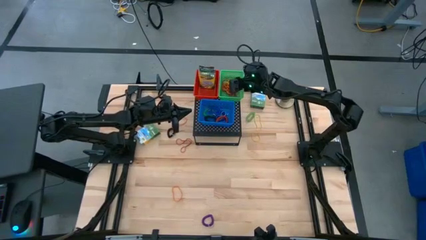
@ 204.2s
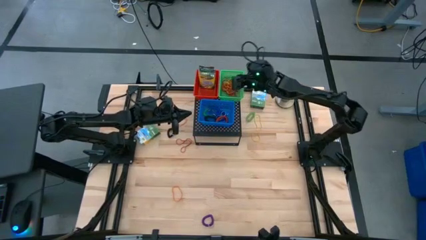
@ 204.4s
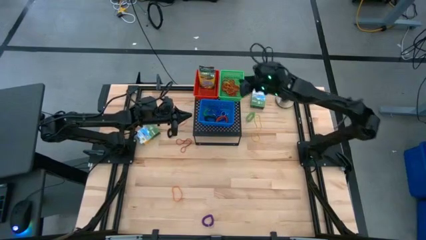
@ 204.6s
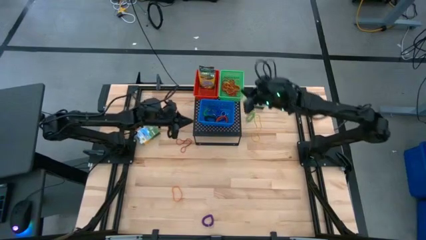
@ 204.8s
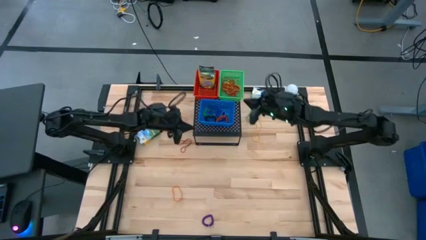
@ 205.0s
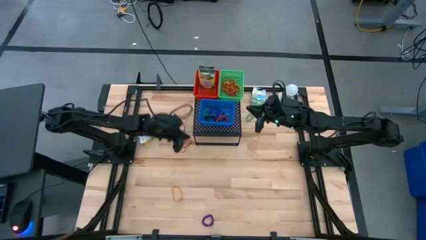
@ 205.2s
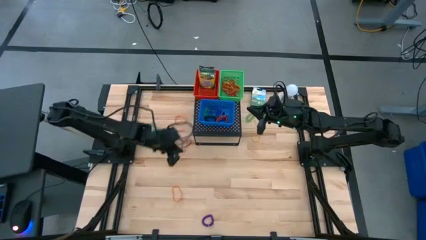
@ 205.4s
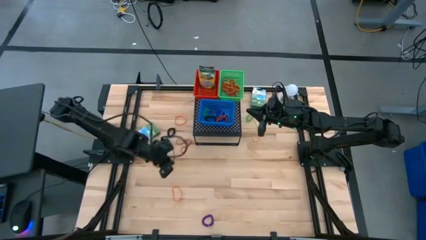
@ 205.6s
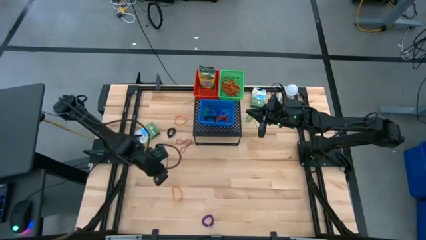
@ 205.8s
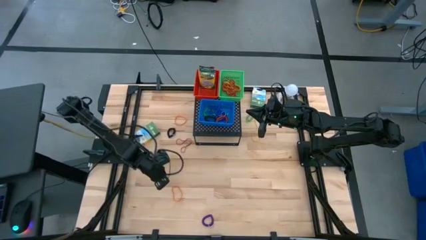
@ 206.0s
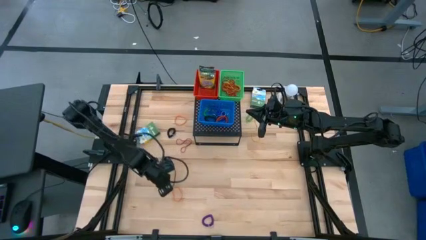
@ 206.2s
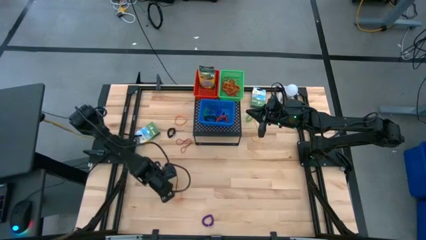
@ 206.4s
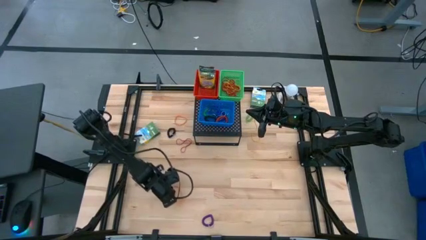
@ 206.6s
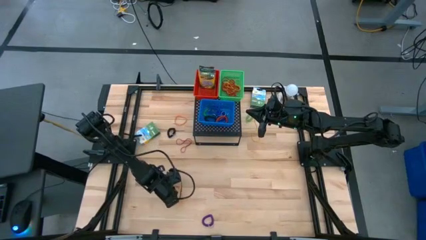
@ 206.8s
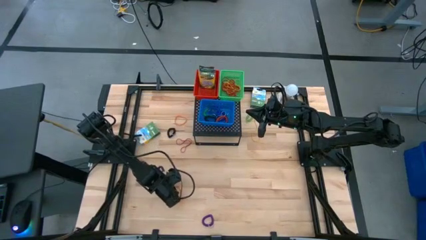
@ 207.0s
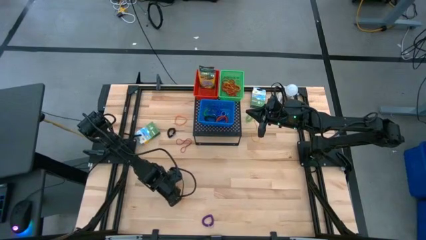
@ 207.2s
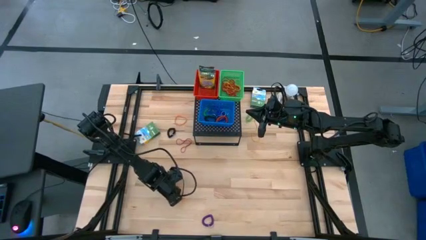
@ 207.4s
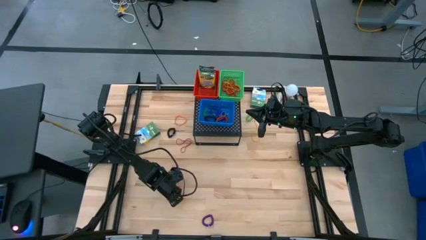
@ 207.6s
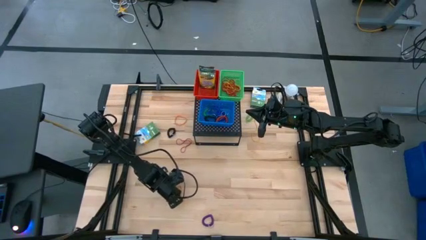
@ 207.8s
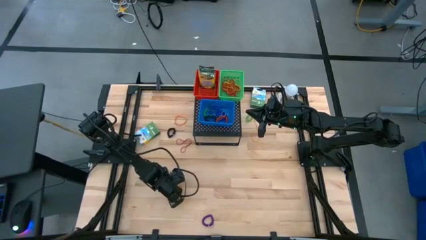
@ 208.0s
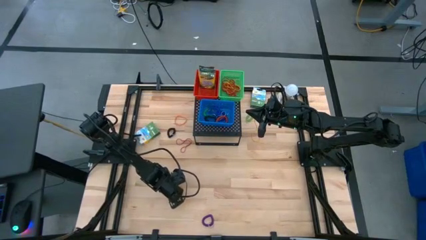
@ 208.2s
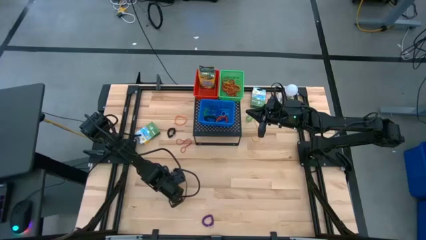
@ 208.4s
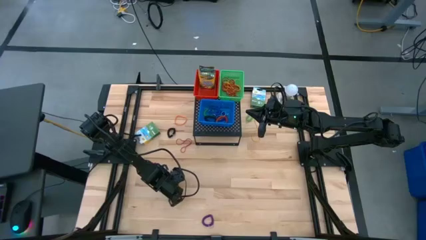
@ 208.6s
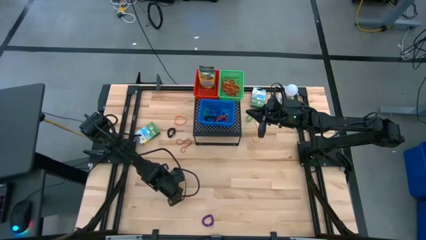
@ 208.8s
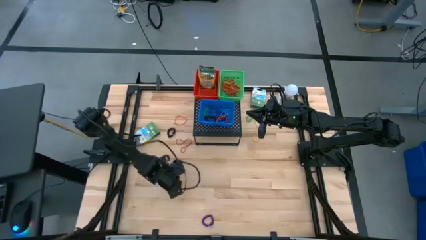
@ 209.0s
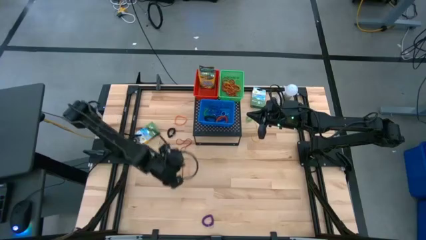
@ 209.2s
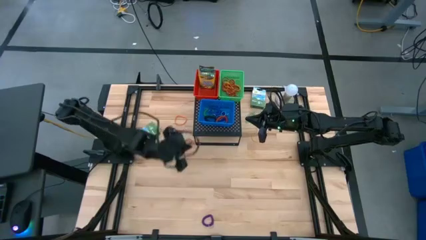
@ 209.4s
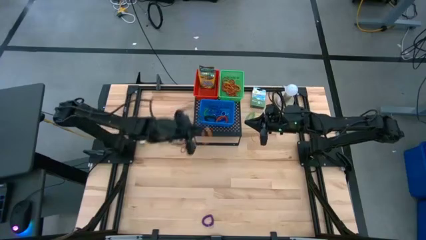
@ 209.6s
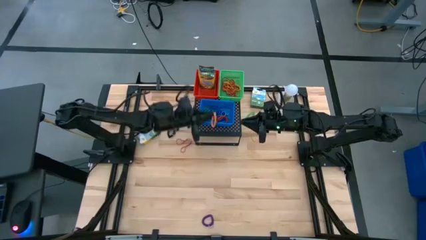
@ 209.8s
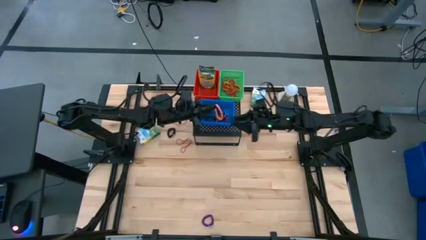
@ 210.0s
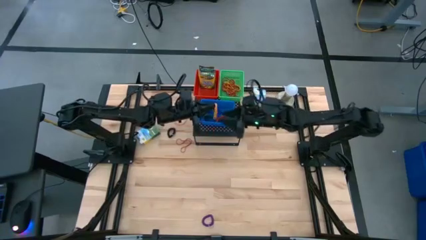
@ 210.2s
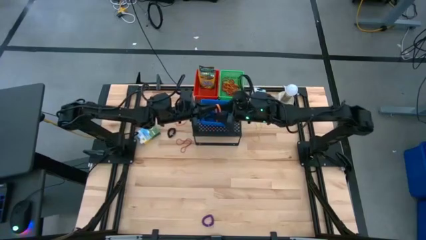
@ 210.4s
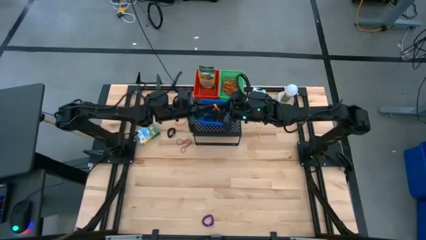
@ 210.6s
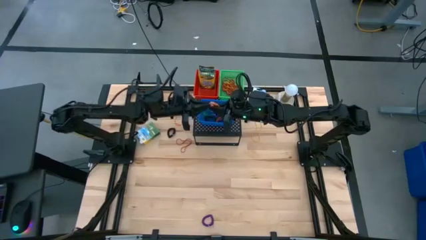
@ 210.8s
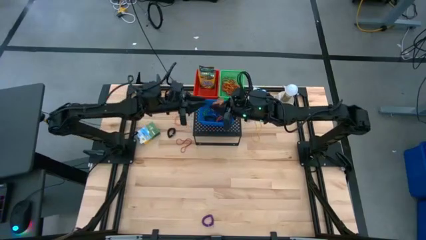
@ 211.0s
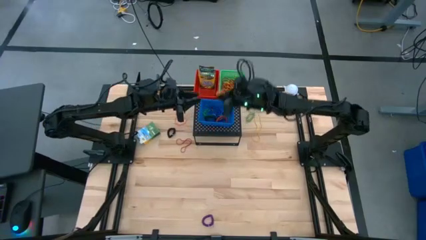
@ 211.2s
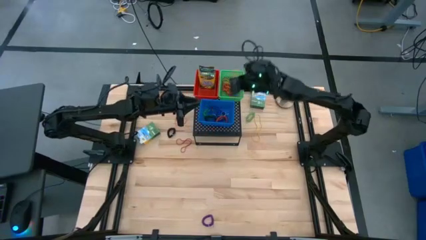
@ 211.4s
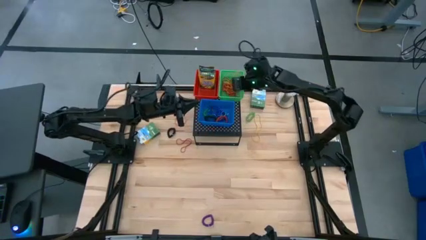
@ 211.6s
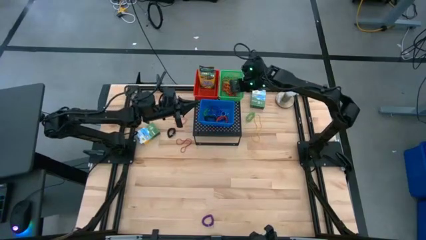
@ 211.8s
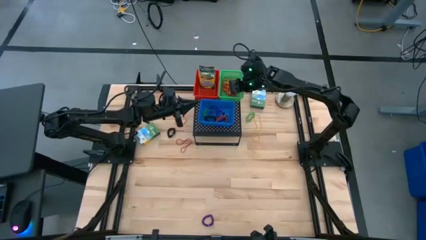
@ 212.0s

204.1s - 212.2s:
Task: Pick & Place Office Desk Supplies
Put the orange rubber band into the green bin on the shelf

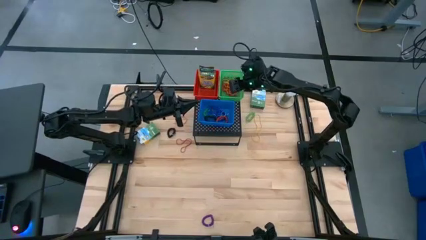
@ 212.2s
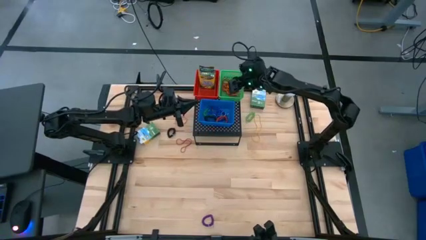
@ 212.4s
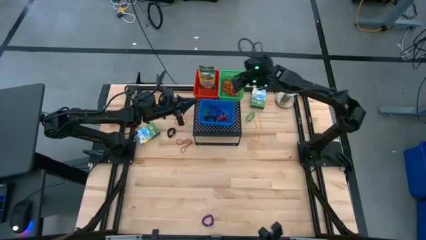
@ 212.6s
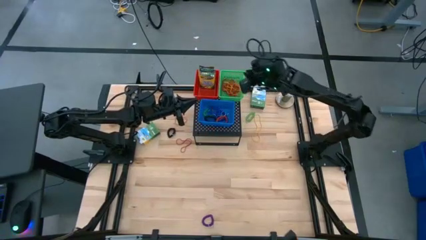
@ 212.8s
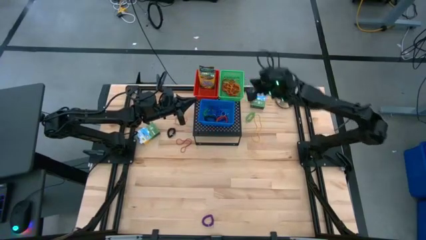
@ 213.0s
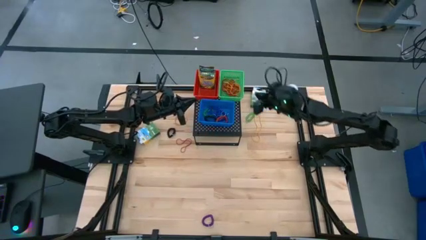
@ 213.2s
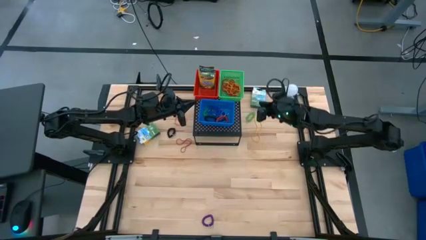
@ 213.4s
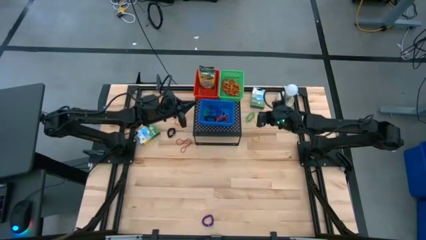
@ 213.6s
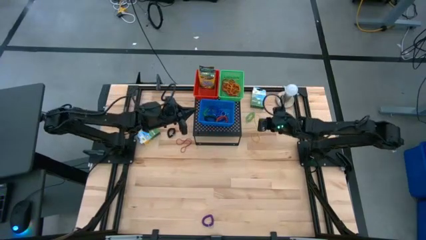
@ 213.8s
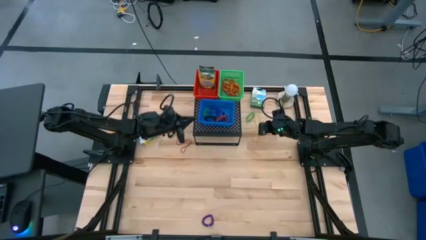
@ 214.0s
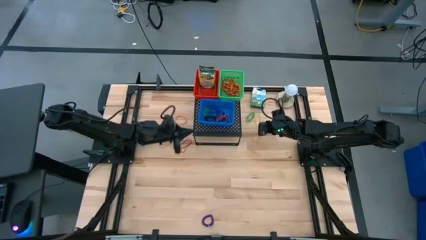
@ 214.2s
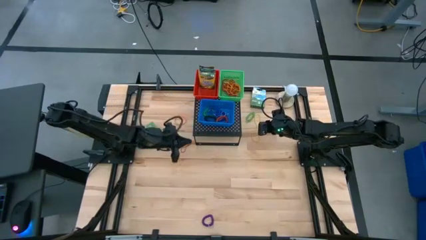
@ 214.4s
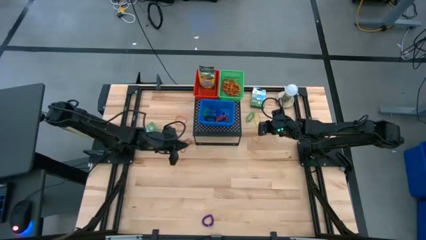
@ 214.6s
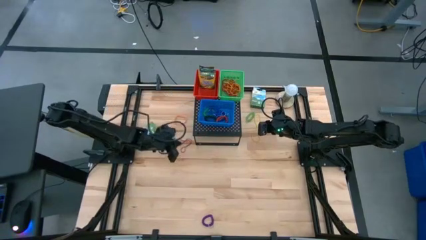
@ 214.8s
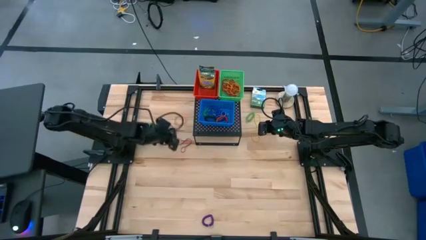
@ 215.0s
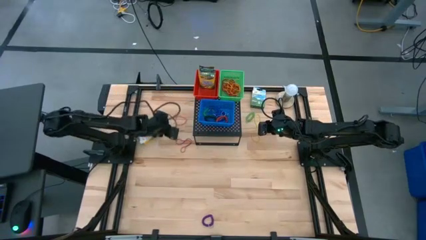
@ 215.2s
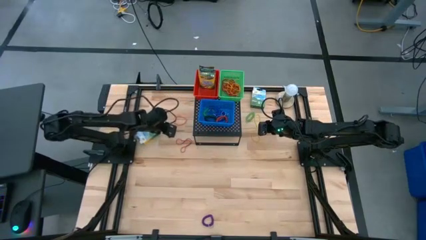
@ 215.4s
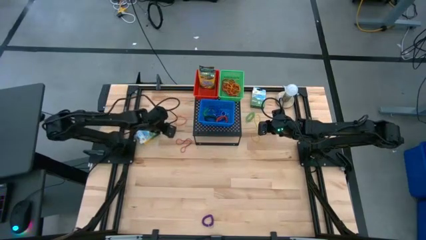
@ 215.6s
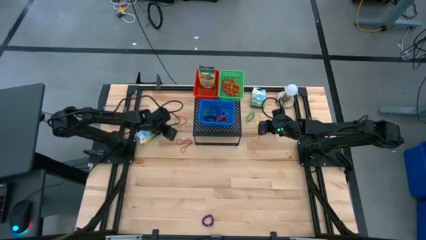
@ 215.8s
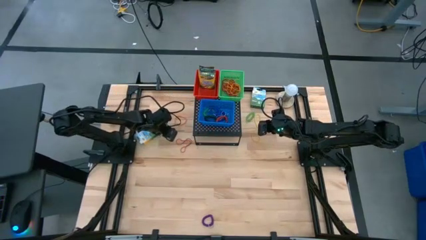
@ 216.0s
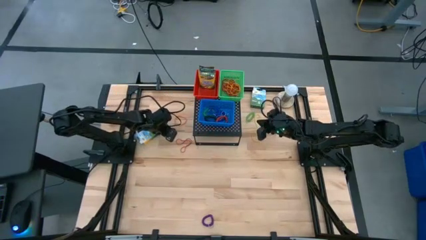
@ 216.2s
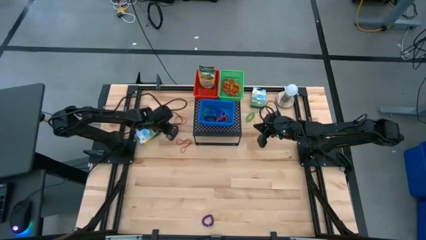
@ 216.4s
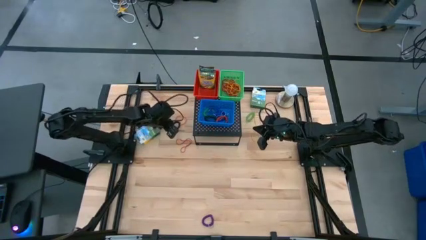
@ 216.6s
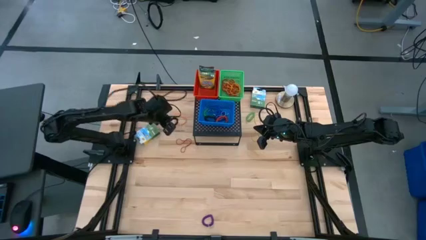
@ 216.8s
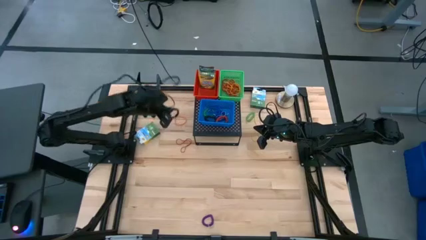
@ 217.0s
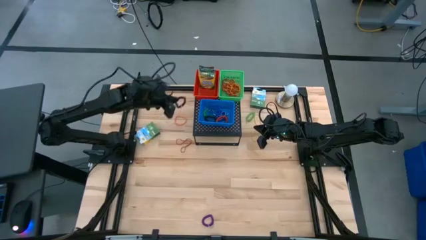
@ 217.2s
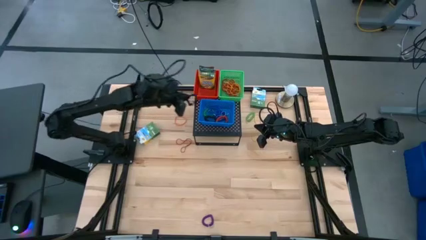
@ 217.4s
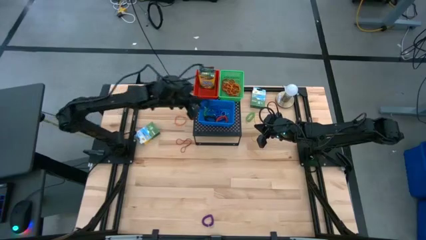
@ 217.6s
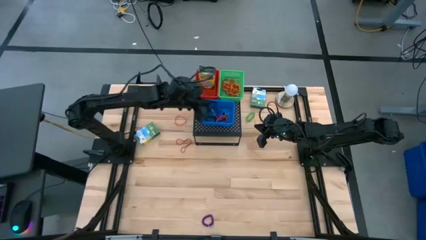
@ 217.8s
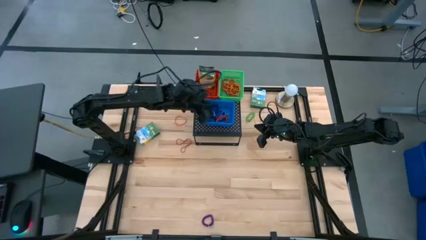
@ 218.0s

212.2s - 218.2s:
Put the black spring keychain into the blue bin on the shelf

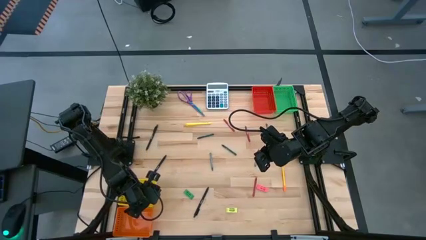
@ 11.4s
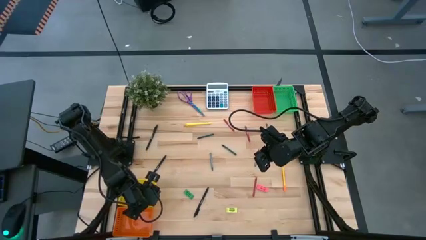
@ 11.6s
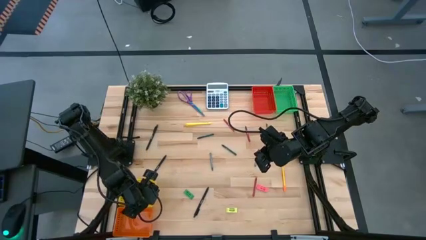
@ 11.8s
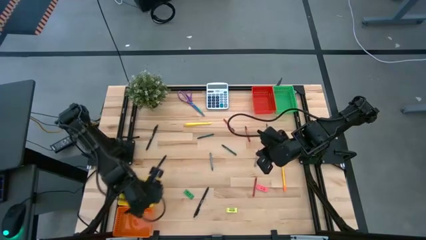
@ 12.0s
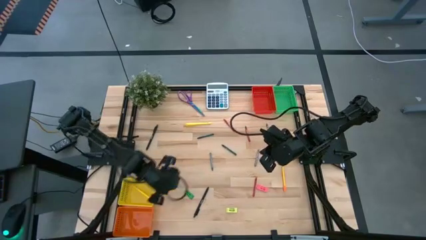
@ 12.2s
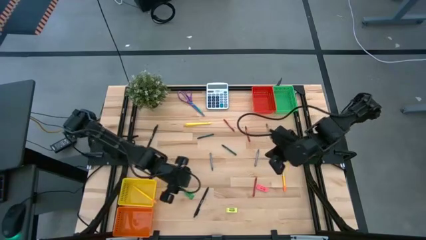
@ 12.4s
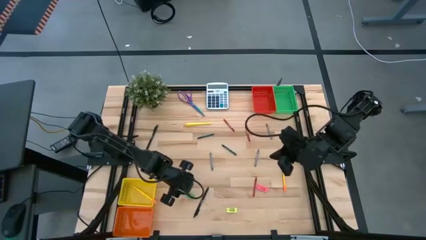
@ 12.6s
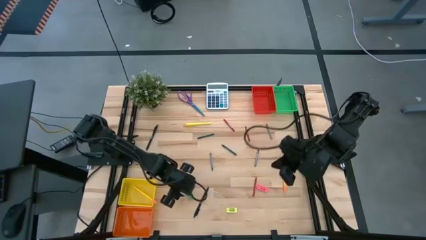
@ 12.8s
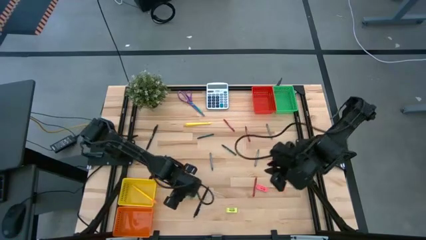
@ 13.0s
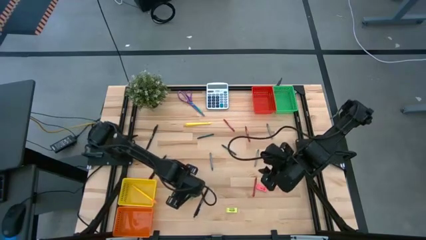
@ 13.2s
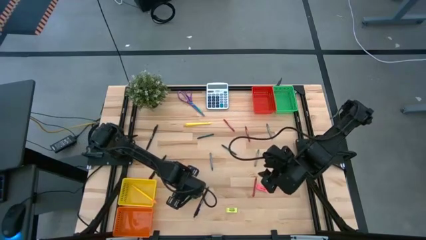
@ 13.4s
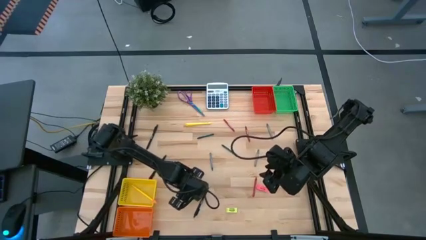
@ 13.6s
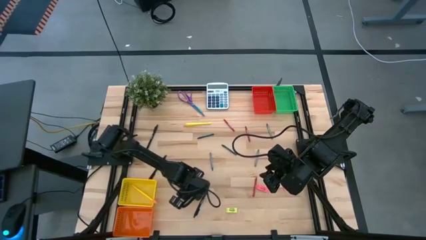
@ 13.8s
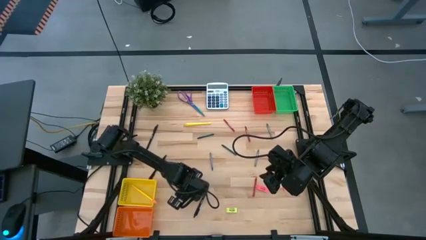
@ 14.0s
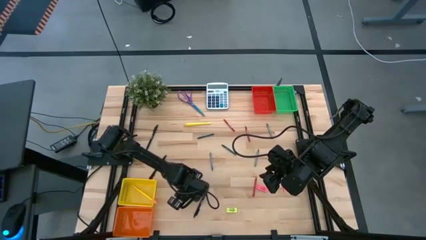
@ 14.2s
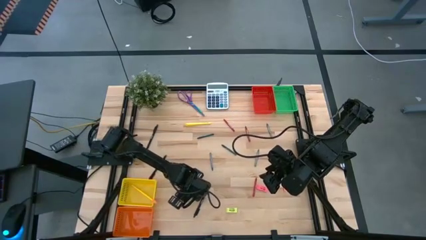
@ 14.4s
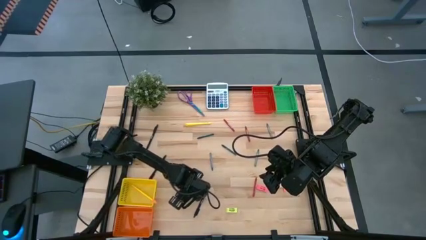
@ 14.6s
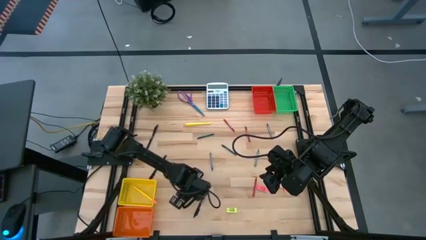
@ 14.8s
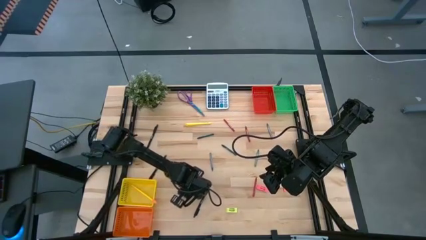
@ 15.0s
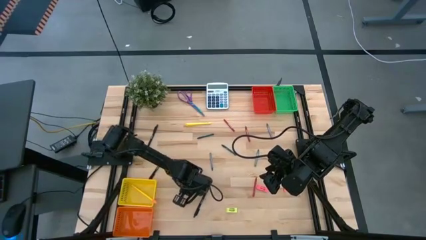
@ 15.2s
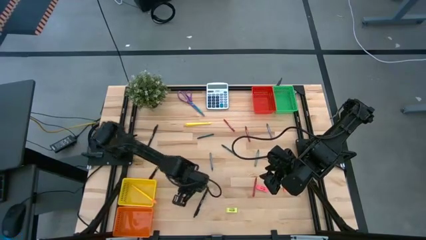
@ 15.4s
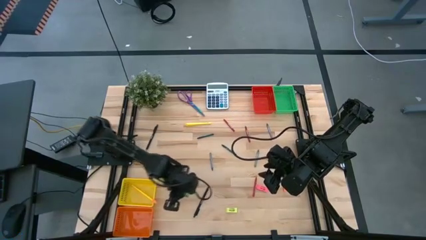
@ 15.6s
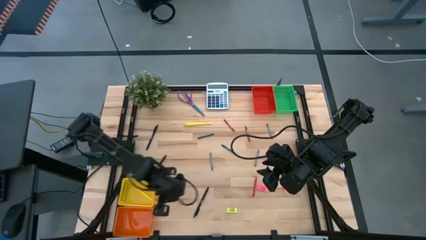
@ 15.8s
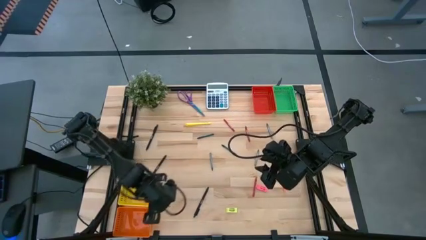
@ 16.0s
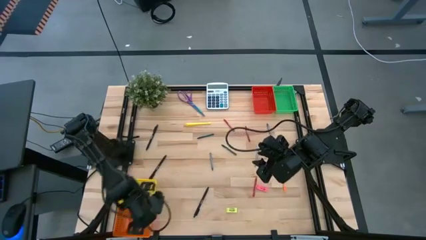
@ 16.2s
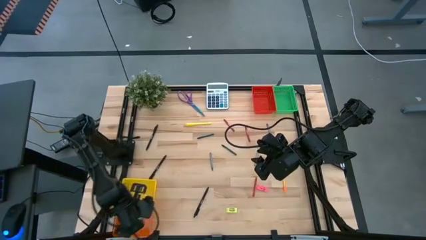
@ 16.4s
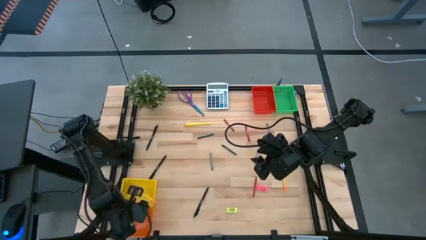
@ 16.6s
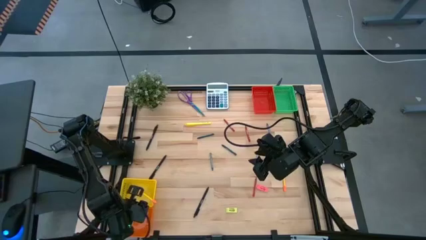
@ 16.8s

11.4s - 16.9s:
Task: Sort crayons/erasers/pens/pencils in bins
Put the green eraser into the orange bin
